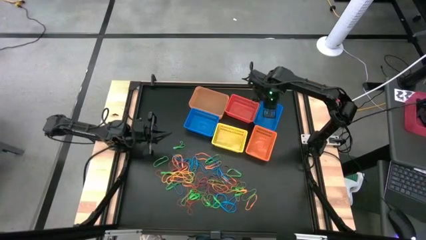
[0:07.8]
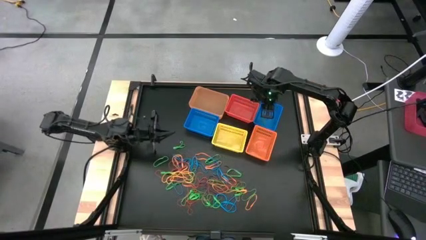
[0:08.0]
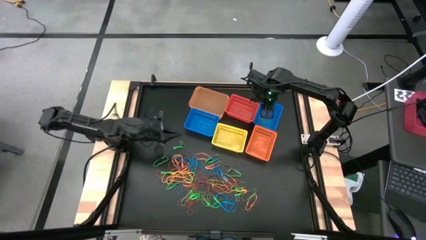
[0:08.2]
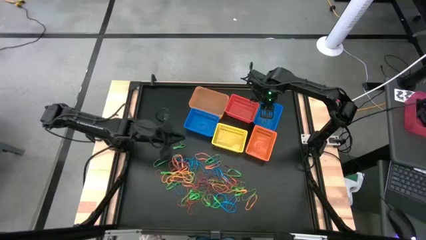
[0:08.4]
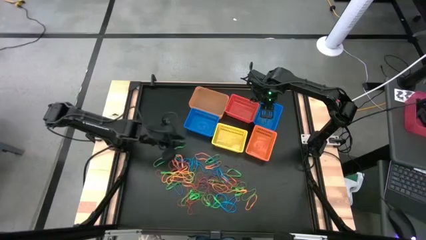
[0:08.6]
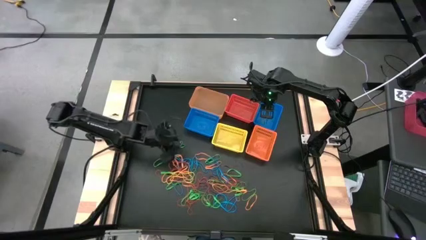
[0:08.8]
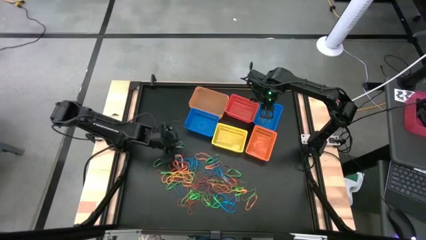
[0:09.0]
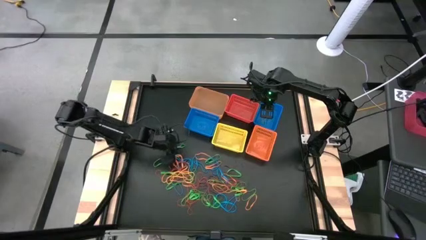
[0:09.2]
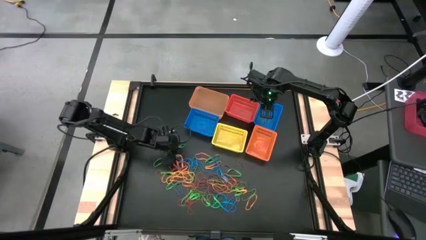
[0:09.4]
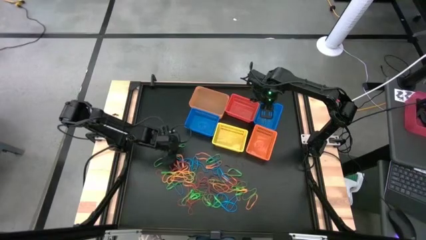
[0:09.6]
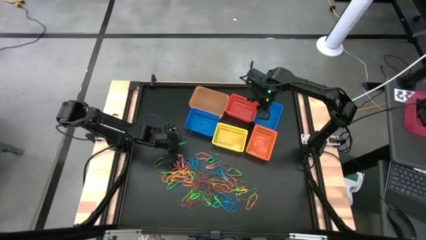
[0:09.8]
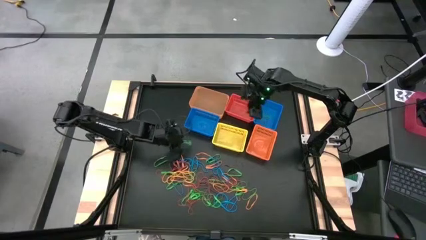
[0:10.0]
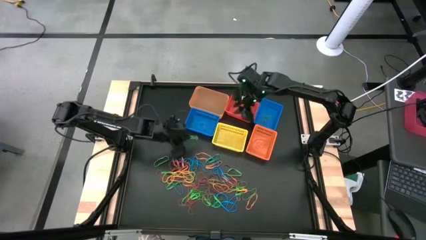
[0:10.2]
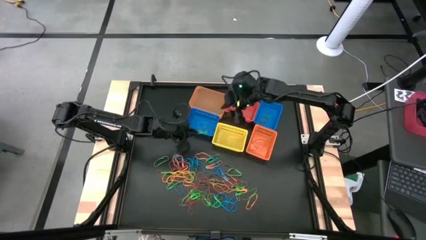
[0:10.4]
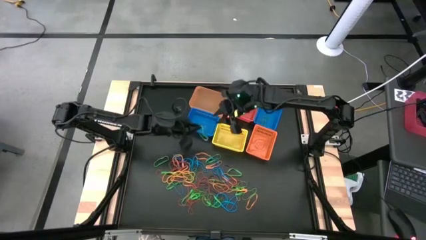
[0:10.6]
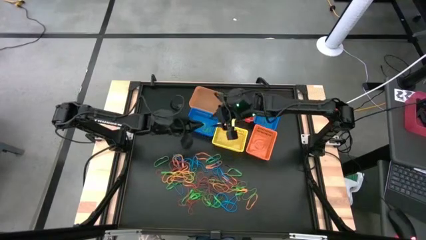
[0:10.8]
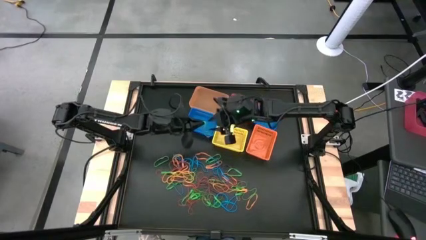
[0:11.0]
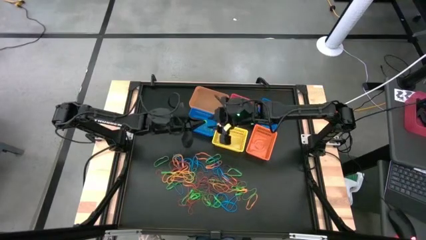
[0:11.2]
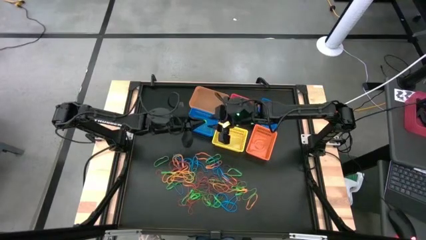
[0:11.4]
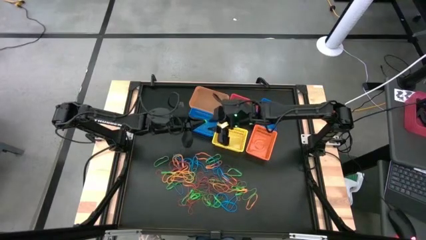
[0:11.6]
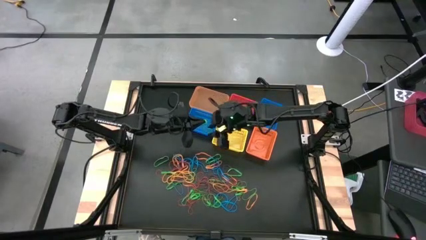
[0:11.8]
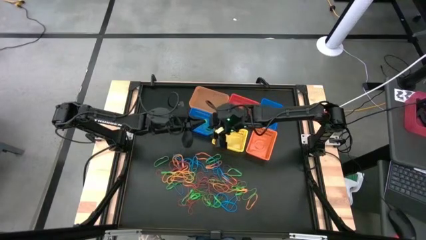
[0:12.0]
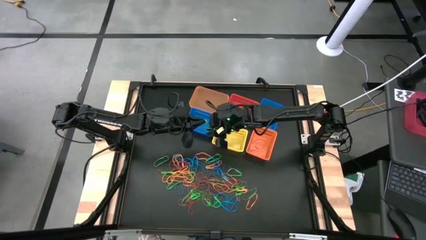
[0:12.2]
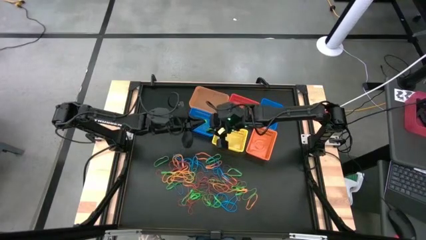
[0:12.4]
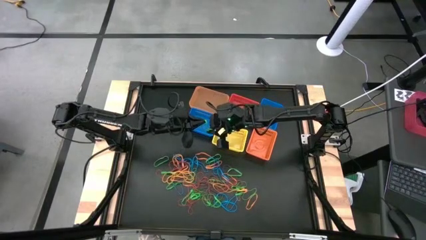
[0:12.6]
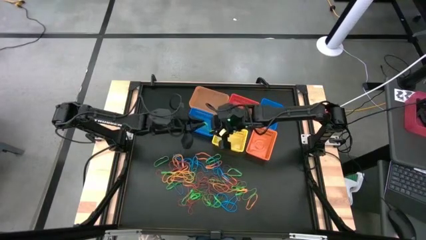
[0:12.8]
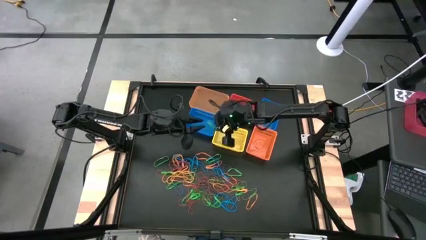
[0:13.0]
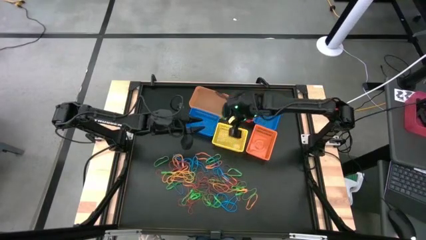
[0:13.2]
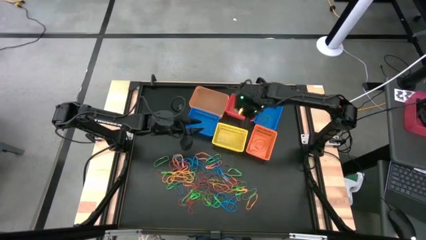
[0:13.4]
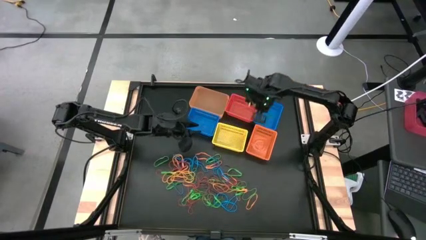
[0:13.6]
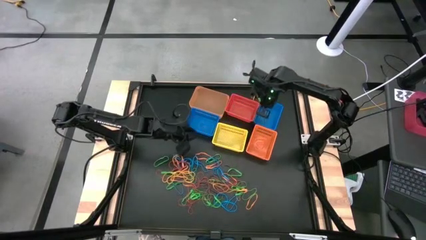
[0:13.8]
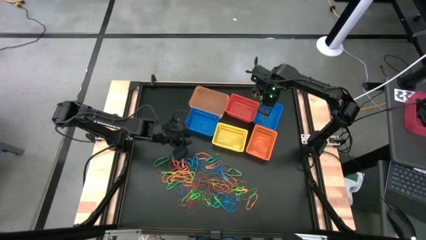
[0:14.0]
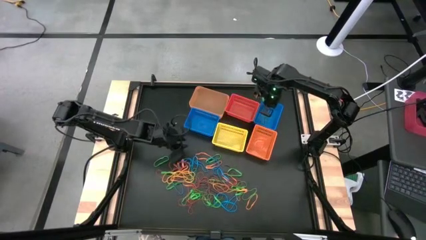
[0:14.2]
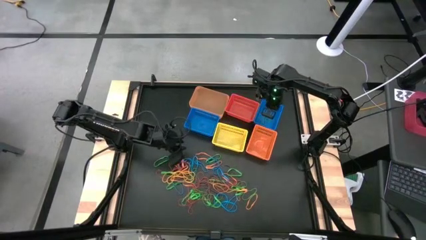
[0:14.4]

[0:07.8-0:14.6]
Task: Sort rubber bands into baskets
Put the green rubber band into the right blue basket

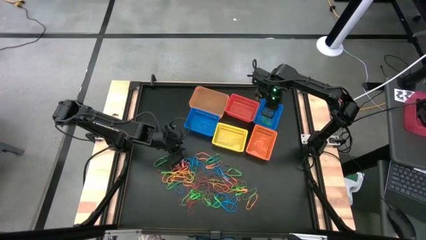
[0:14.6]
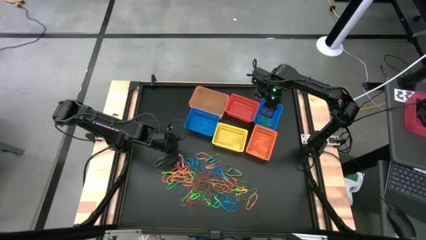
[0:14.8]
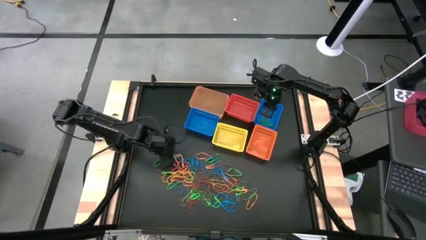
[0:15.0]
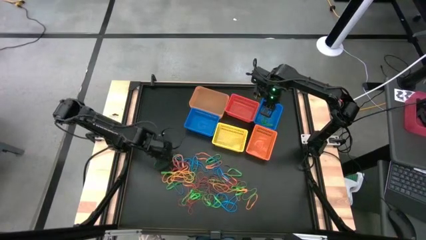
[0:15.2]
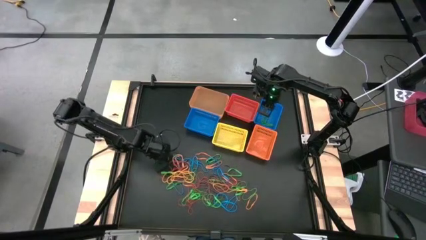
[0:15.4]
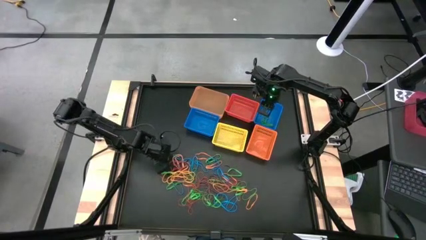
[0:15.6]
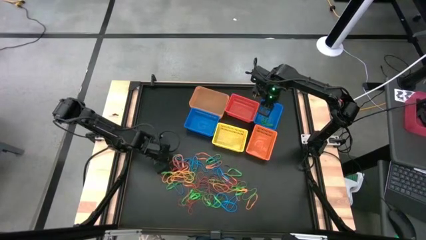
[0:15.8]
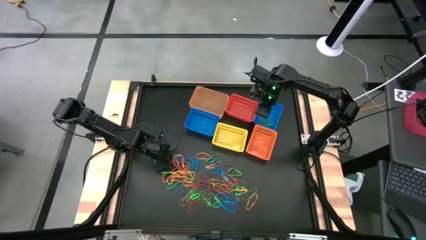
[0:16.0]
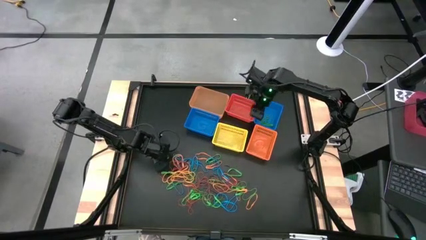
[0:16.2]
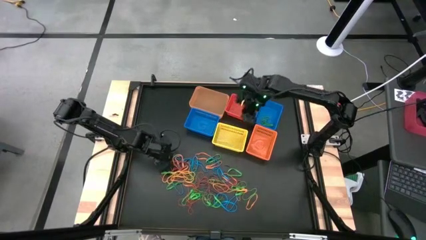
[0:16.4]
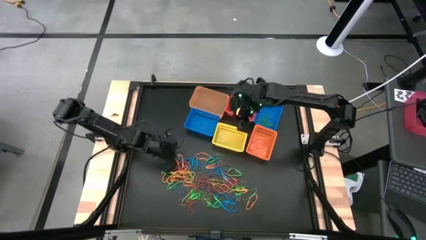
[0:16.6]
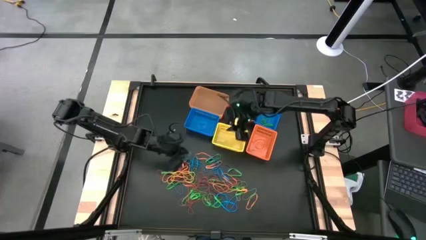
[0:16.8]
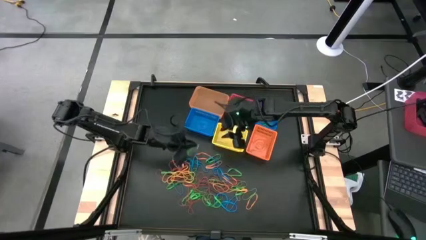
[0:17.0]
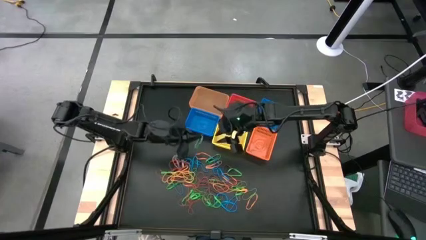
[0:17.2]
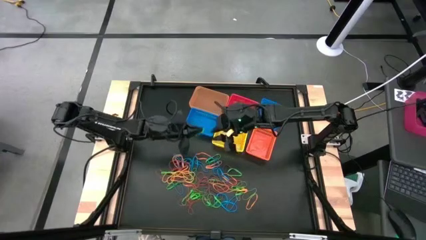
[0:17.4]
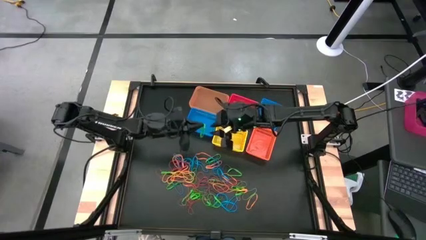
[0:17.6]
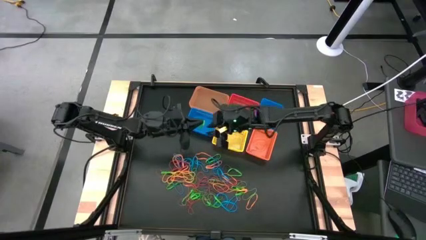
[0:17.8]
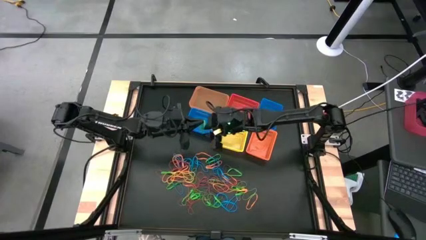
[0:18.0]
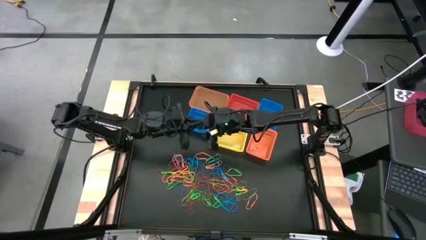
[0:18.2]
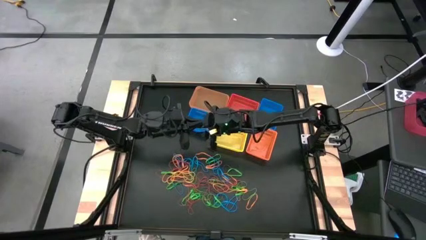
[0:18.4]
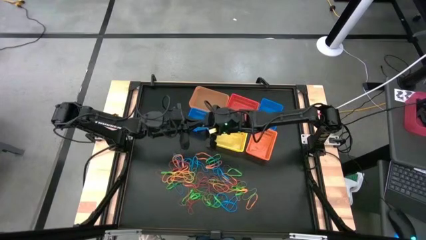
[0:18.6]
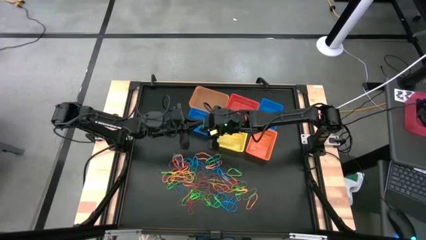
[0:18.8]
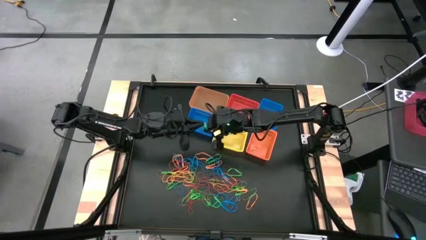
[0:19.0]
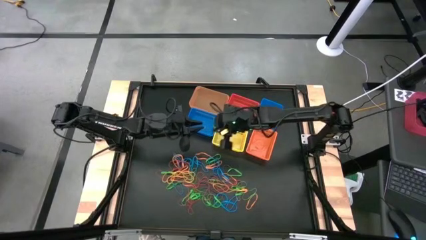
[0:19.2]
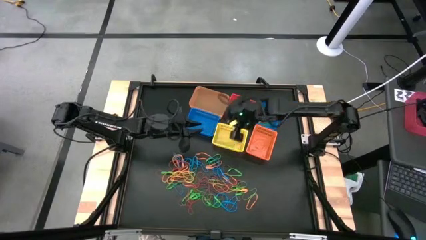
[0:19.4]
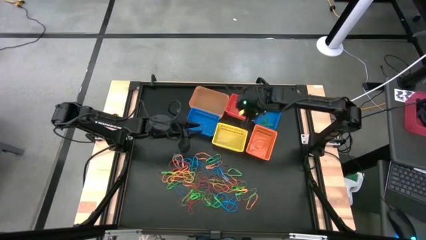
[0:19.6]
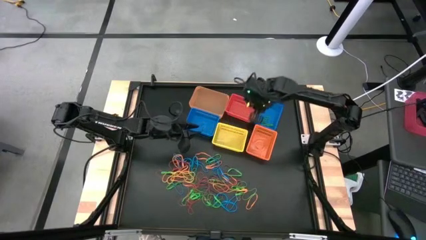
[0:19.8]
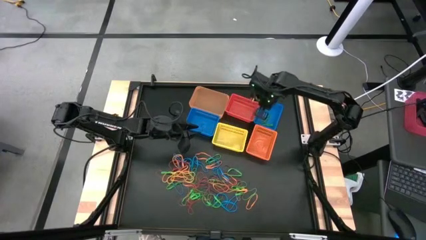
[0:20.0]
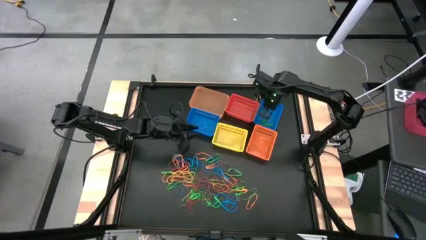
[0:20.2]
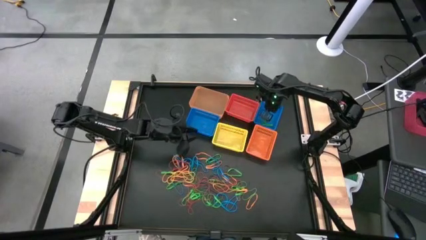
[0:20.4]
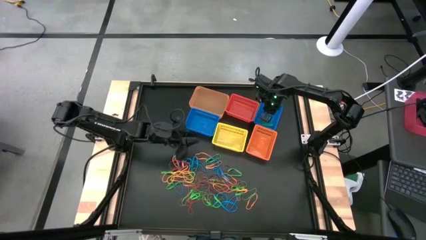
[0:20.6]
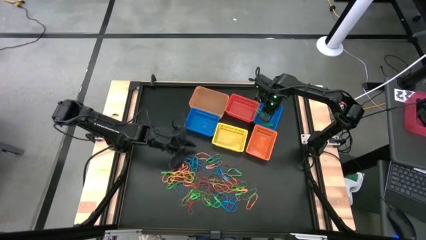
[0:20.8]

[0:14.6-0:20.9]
Put the green rubber band into the right blue basket

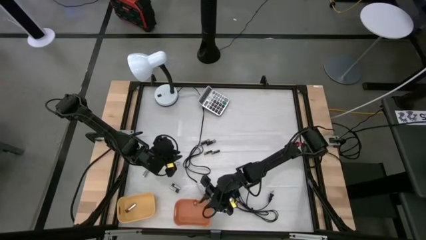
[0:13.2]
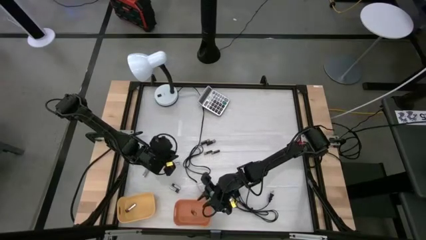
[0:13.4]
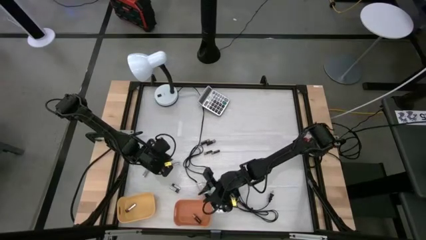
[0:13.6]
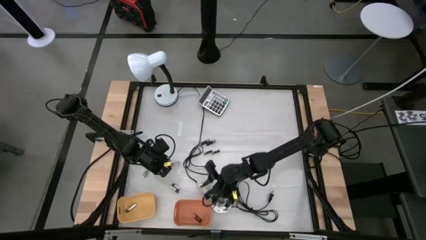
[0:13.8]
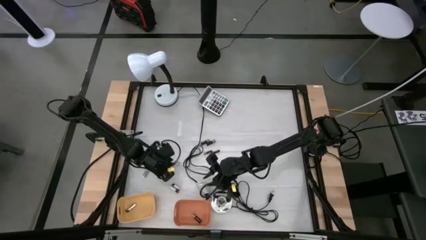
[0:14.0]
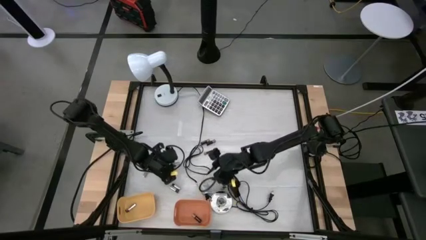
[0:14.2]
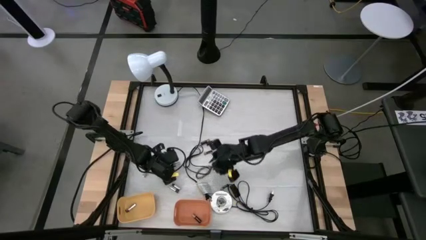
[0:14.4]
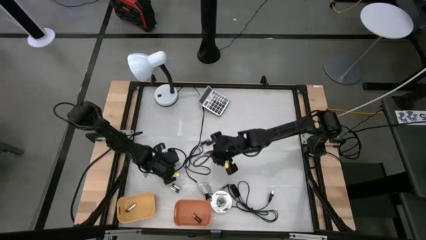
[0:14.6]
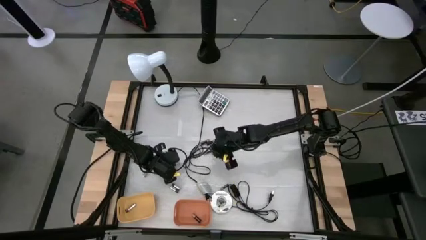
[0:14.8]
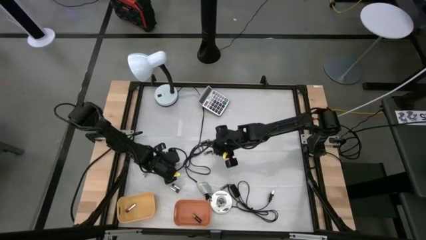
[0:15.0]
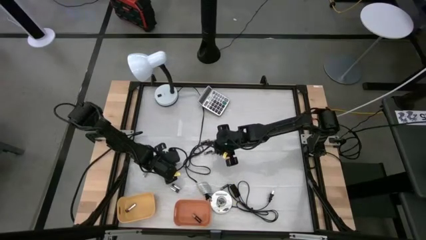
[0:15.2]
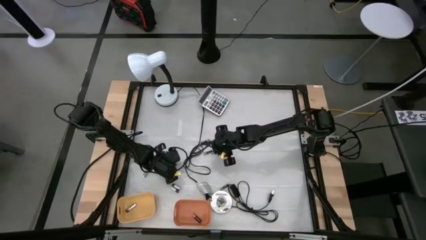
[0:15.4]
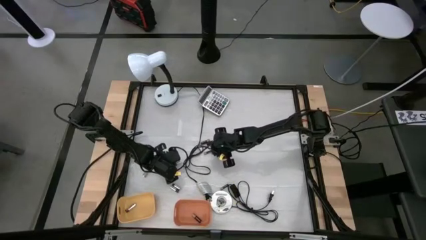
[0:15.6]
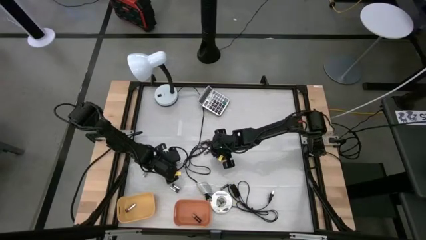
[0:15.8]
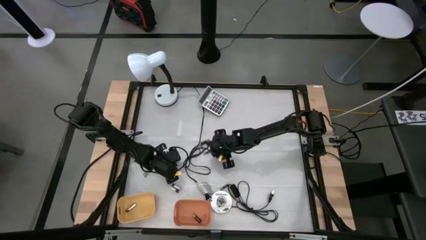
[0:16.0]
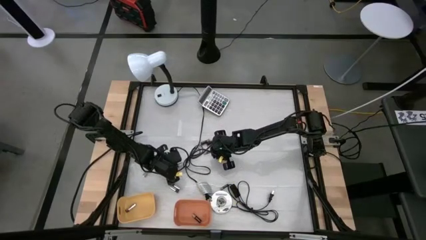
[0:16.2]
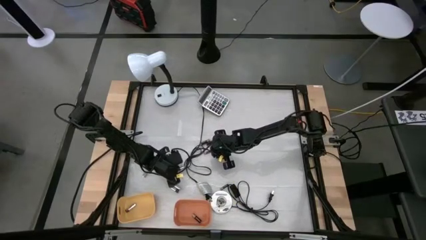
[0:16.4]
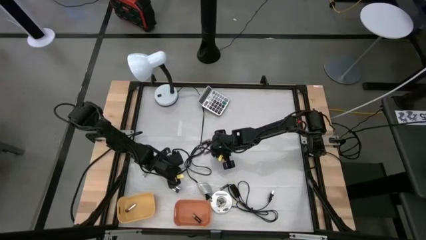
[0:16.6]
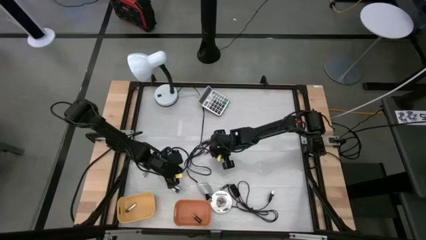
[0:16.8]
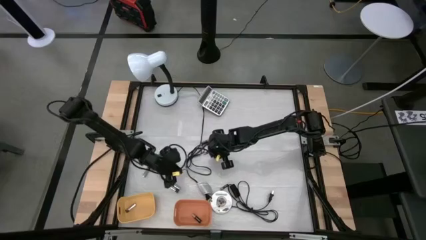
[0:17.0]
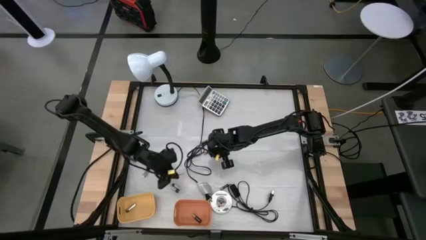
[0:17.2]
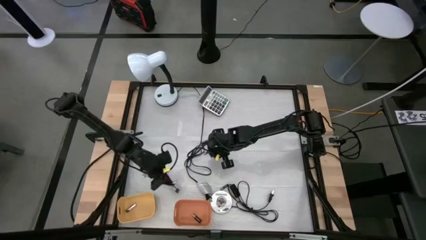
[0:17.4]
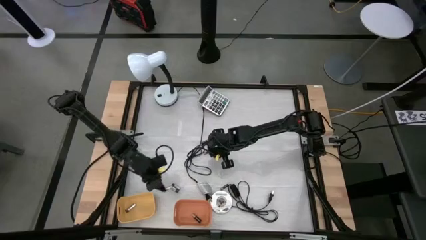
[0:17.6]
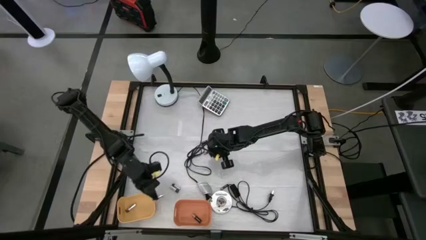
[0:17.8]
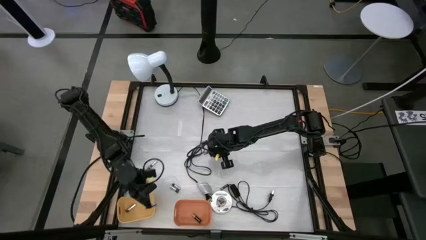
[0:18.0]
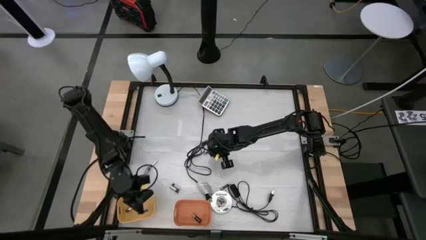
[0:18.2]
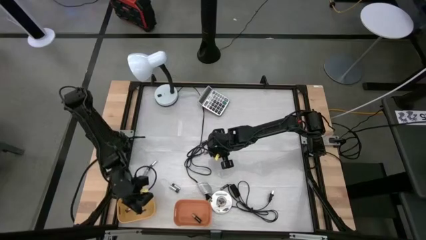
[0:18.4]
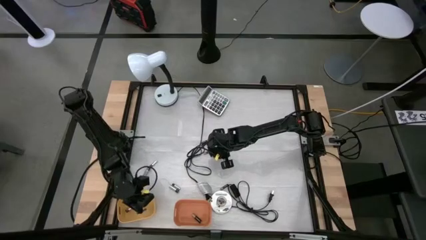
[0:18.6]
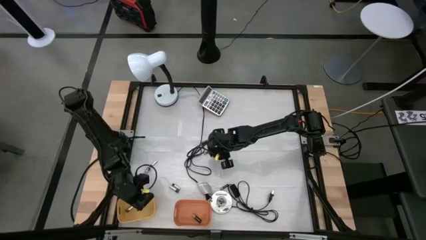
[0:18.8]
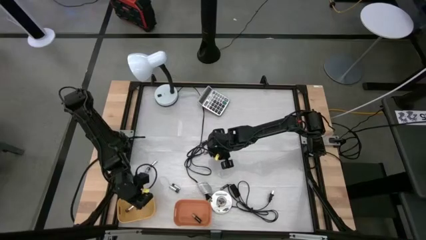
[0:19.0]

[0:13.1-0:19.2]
Task: Sort batteries
Put the white battery into the yellow bin
